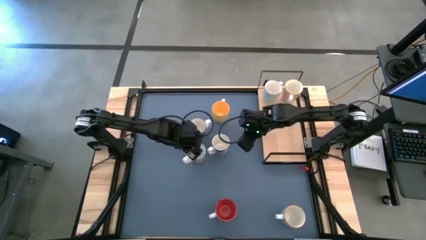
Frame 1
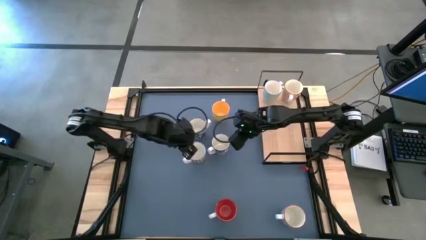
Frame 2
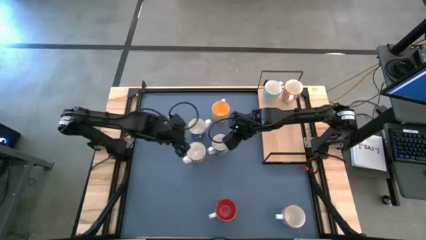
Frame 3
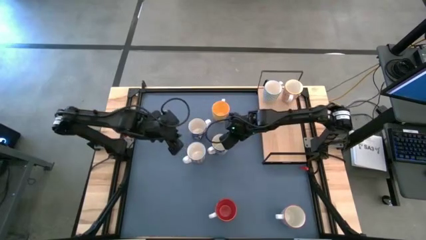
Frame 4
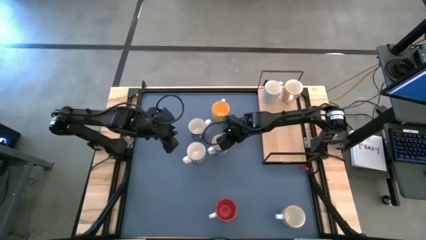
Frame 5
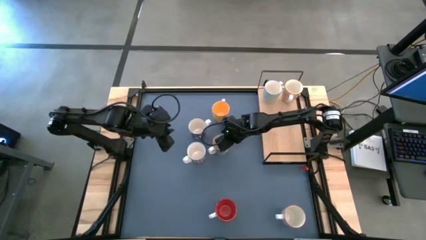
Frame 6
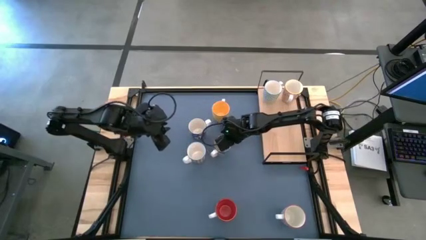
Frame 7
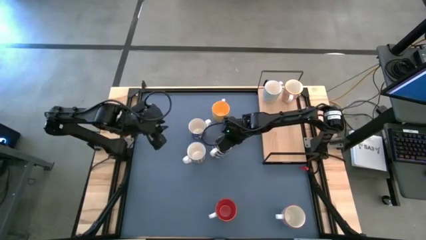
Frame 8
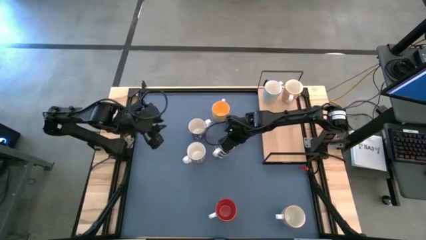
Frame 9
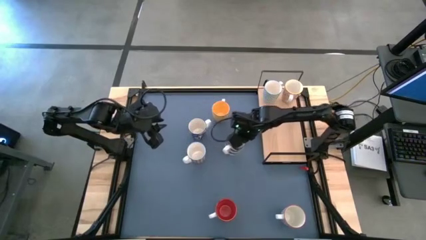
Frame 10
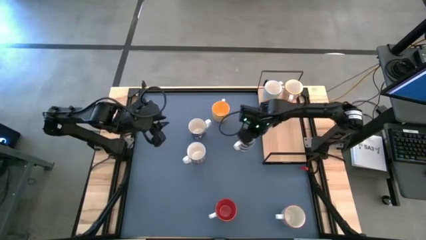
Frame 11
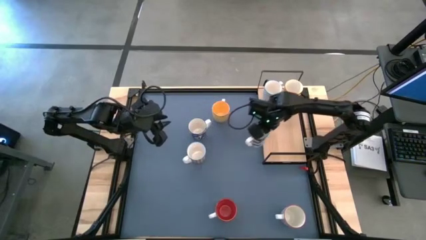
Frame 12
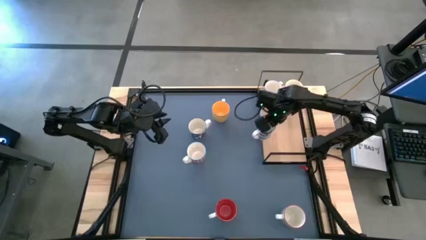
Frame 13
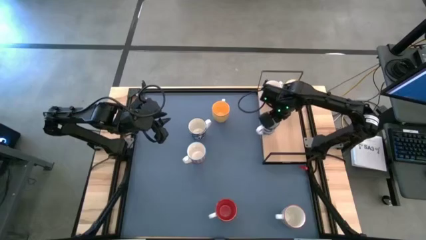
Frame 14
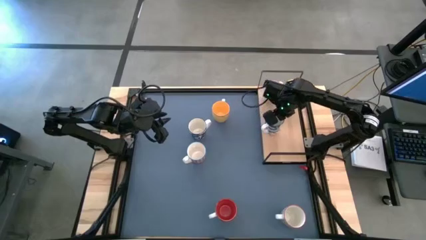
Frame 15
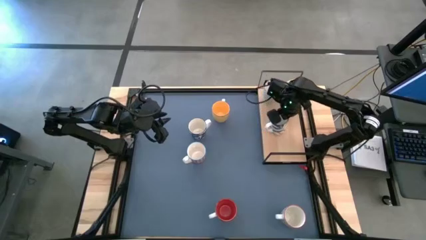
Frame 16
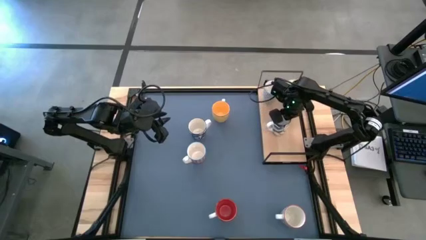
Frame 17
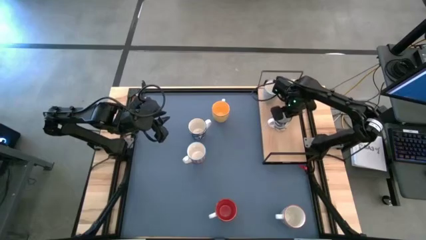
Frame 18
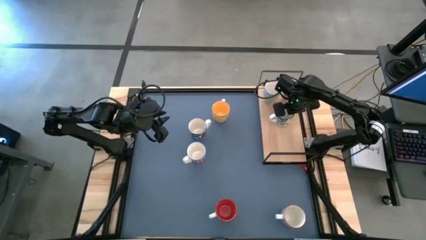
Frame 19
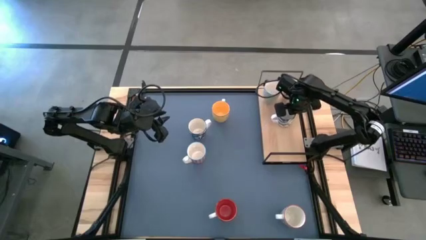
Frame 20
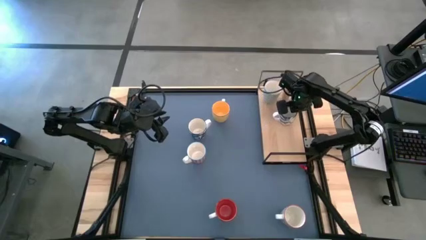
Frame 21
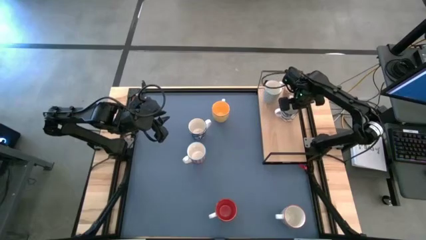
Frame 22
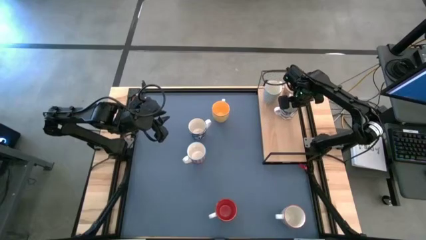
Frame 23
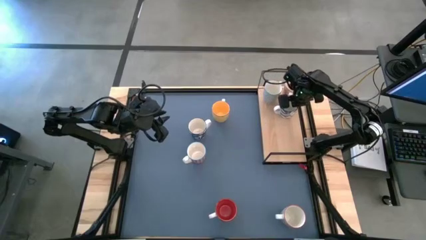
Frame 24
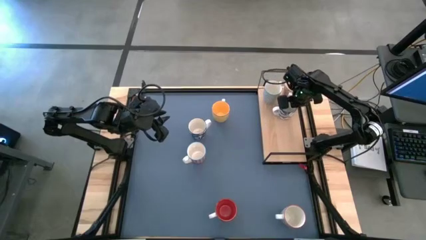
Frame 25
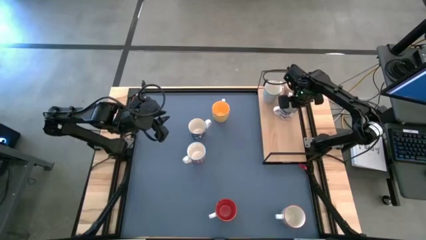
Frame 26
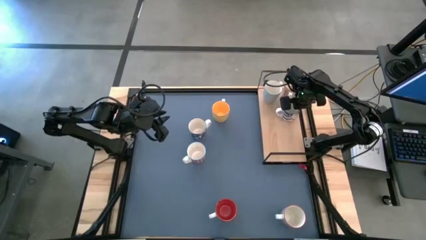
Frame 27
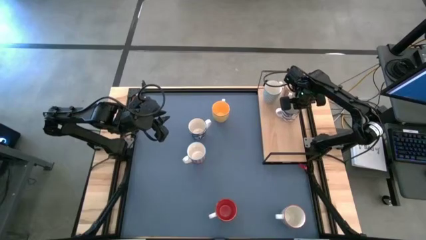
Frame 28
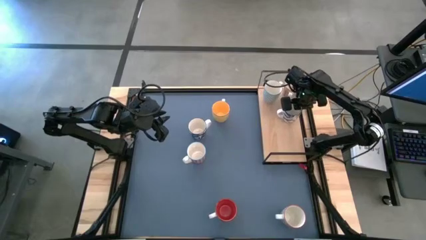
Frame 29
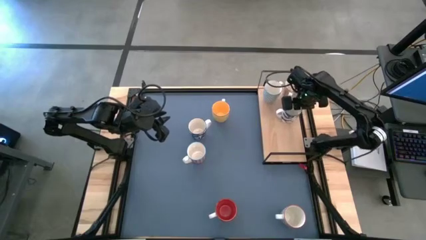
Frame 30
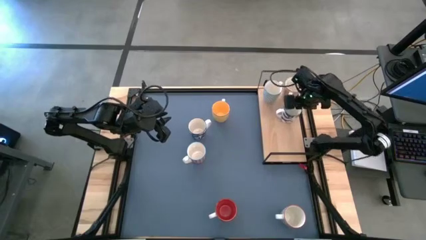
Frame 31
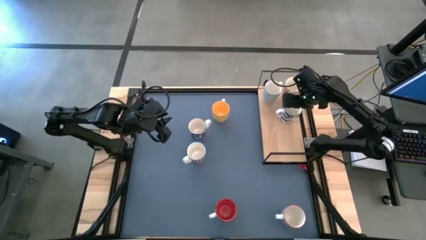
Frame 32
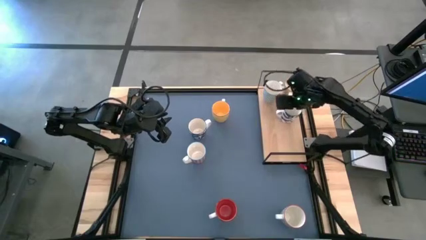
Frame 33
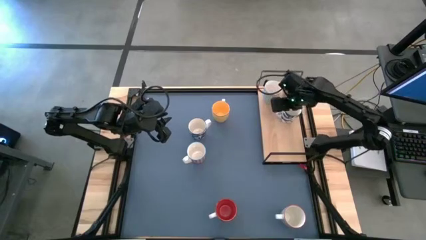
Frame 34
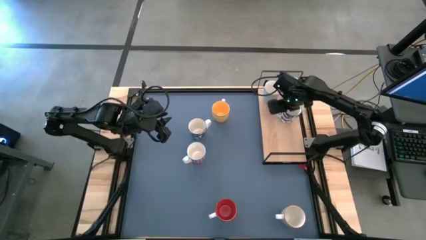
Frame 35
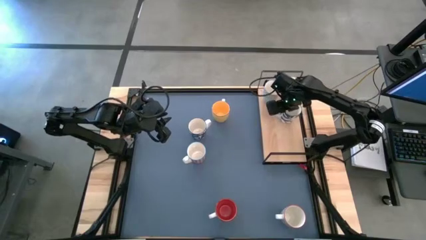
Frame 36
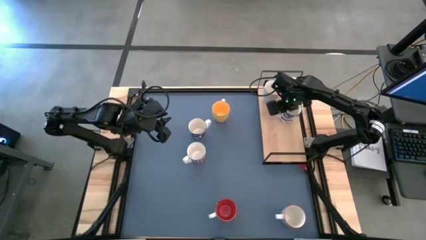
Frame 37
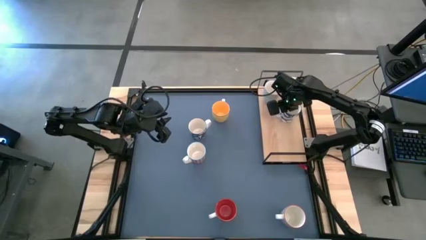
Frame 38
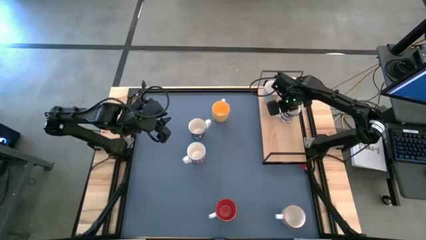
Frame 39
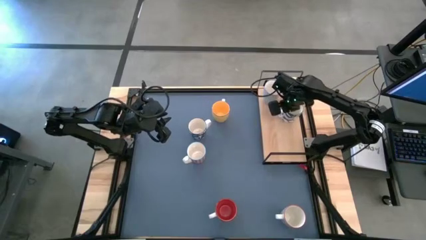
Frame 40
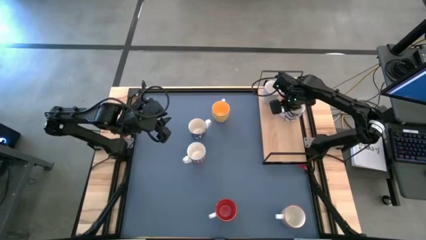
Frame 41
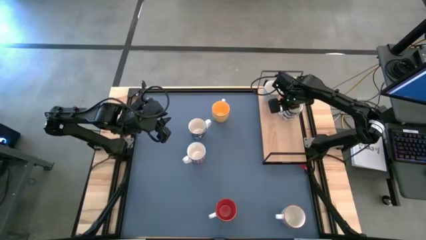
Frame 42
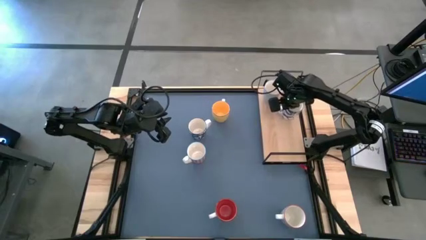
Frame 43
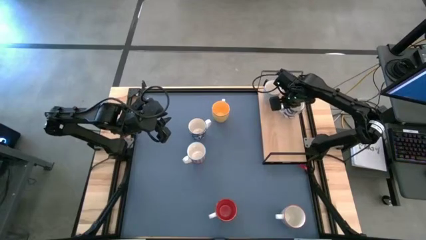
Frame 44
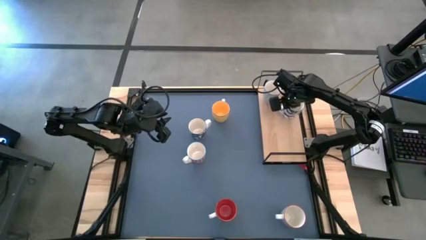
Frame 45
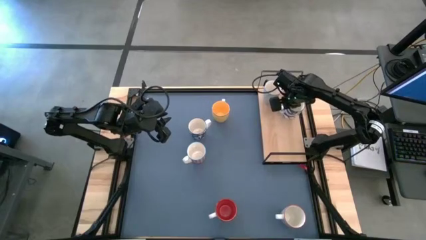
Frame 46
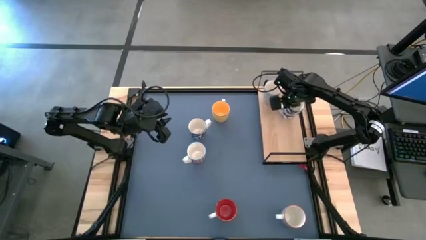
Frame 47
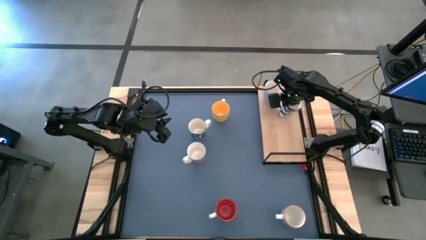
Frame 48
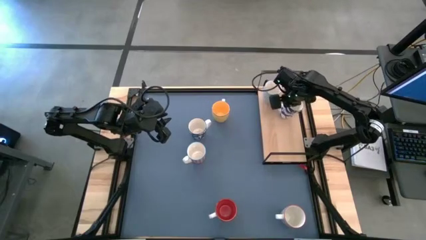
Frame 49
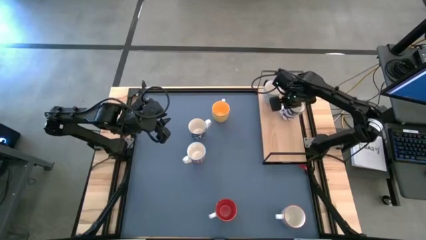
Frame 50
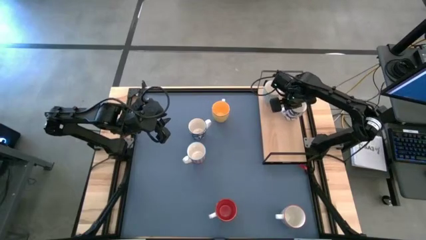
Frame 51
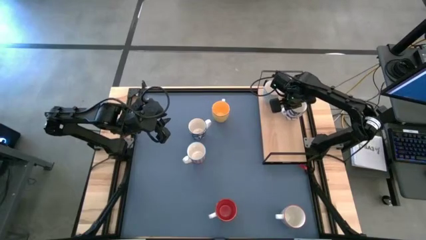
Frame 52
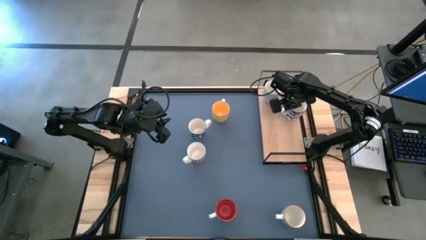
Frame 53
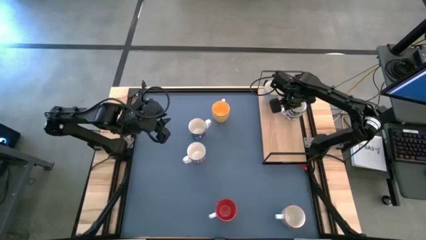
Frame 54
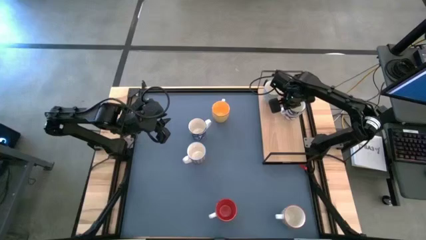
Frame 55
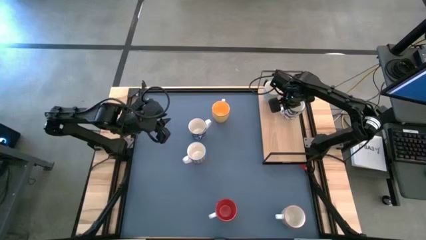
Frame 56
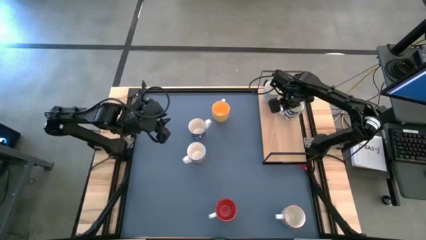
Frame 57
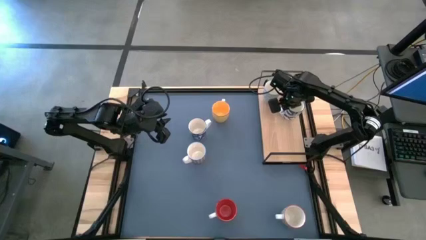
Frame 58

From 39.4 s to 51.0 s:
Task: Place coffee mugs
Put the dark blue cup on the shelf aligned with the orange cup

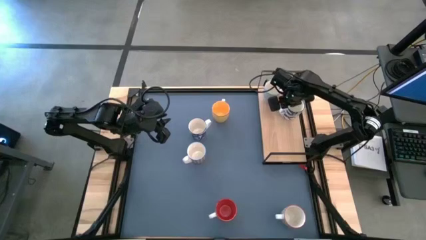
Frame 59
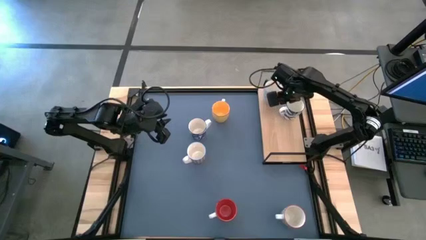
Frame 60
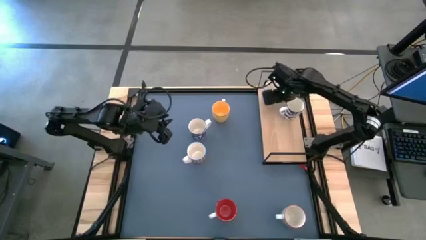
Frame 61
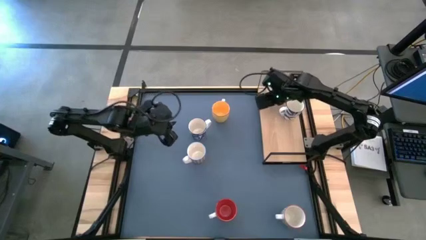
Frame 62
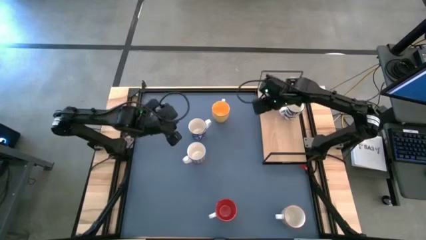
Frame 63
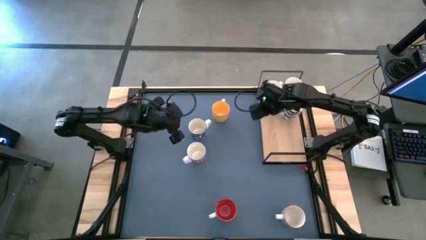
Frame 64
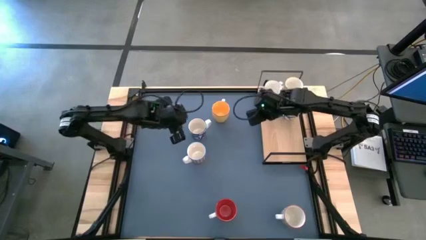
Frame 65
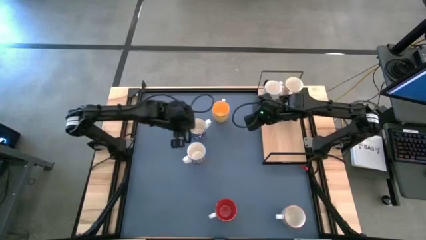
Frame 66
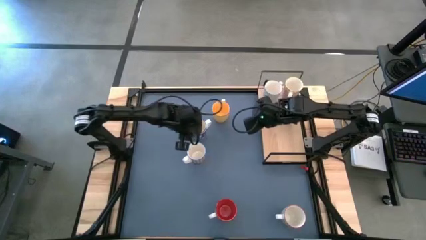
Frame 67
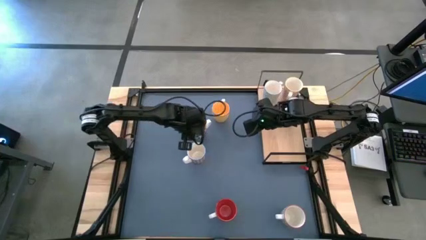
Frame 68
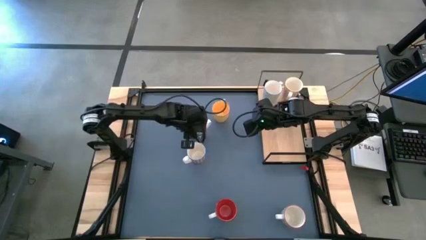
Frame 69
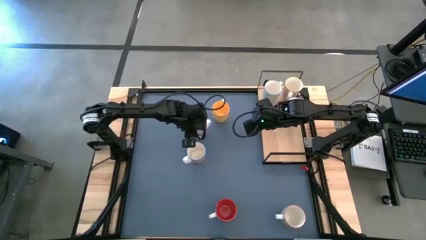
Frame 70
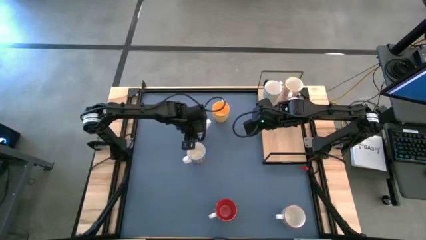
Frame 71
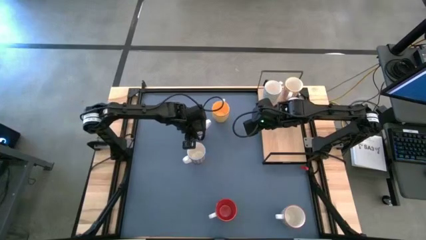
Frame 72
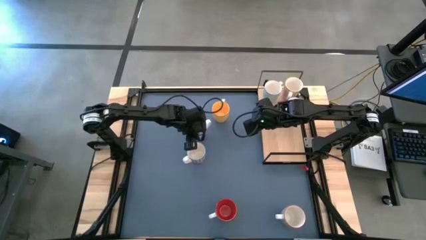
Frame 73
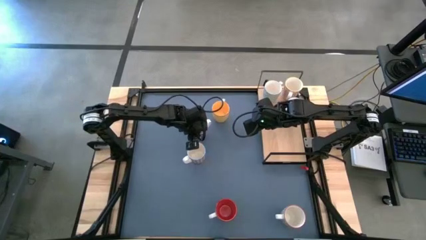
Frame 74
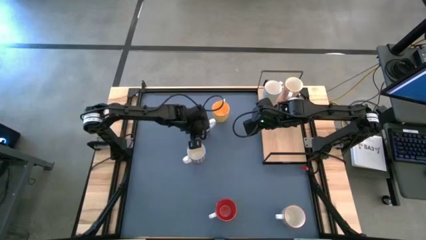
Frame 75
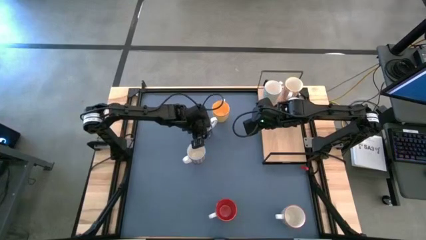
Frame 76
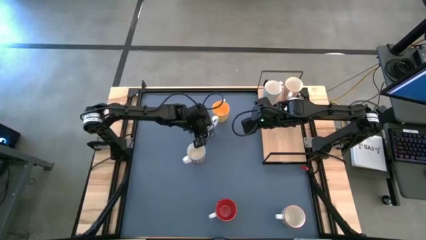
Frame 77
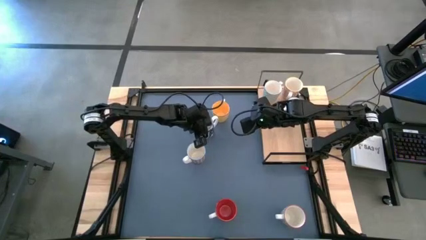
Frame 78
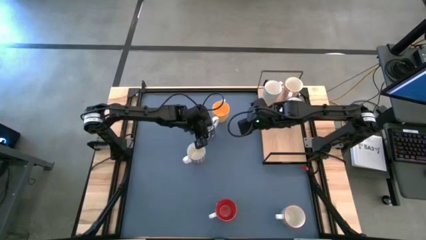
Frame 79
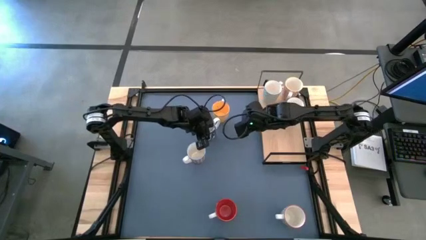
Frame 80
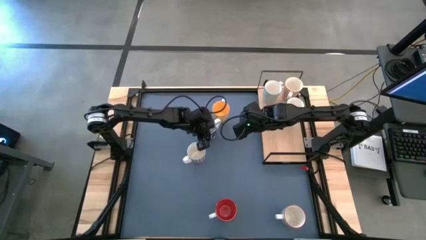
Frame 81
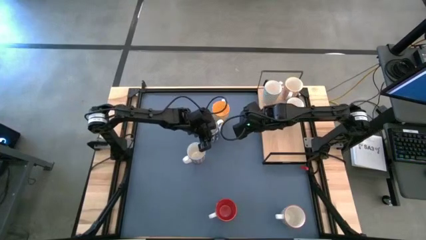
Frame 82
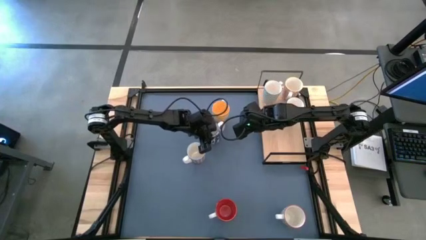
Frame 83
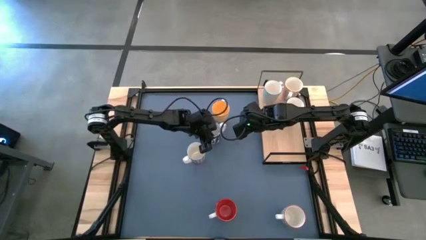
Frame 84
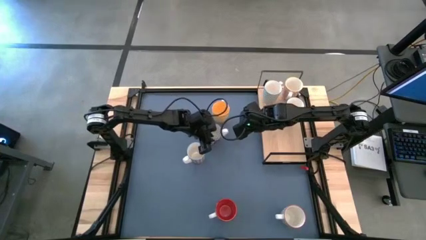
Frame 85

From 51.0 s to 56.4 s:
Adjust the blue cup
